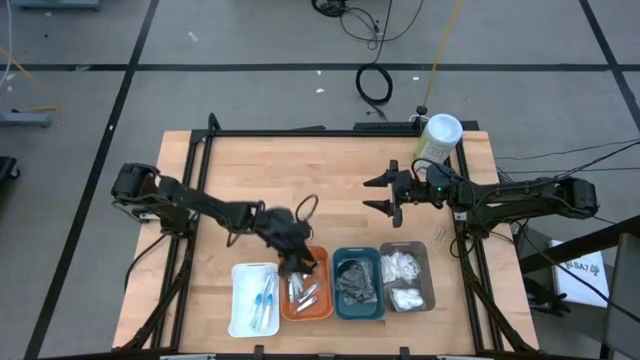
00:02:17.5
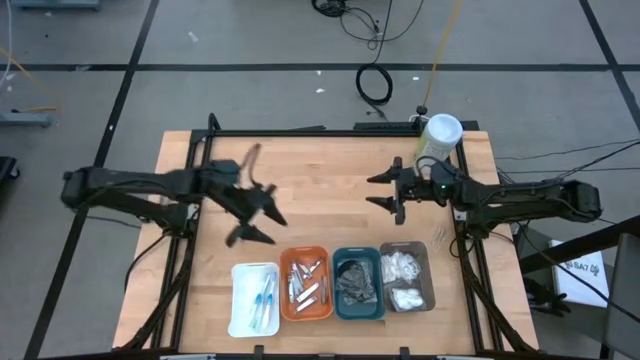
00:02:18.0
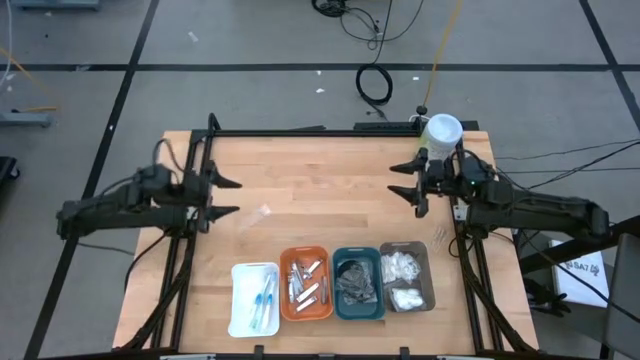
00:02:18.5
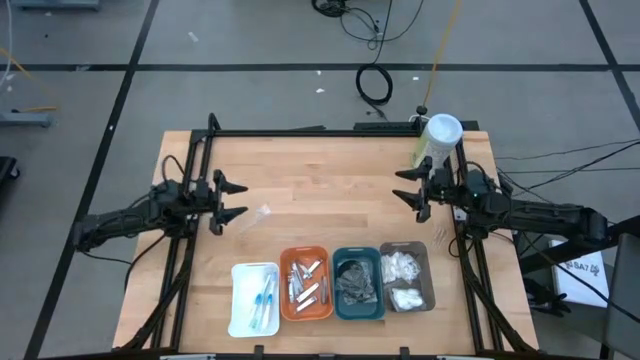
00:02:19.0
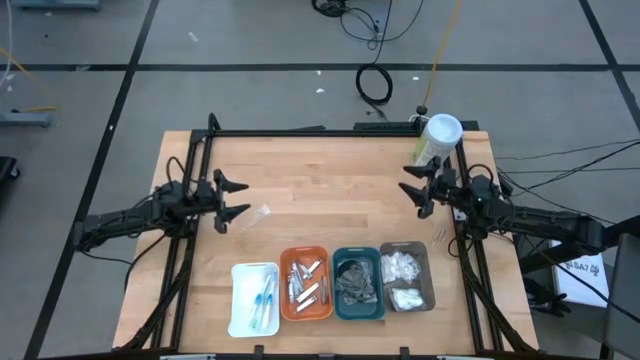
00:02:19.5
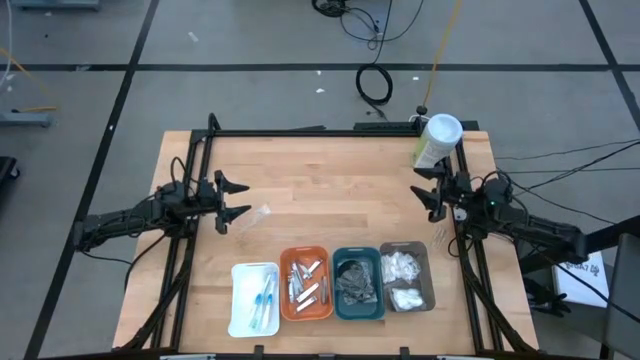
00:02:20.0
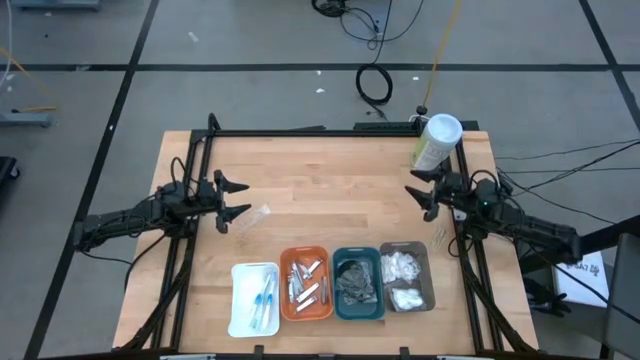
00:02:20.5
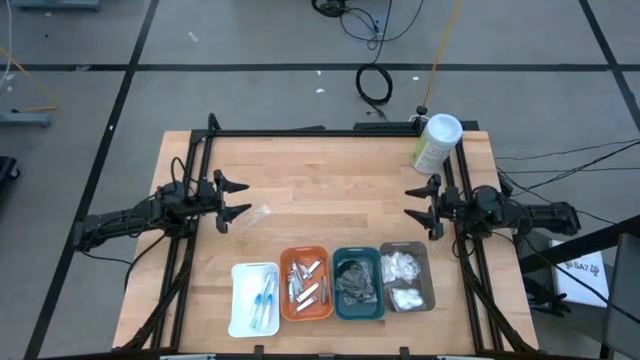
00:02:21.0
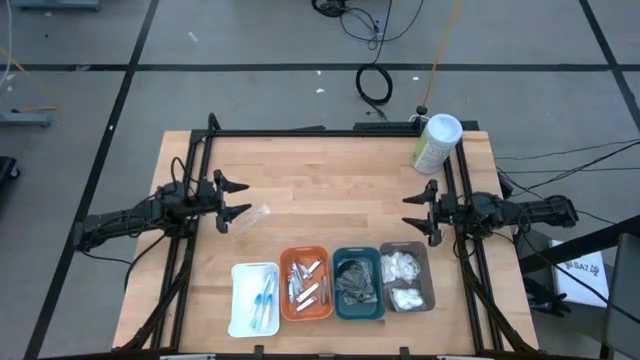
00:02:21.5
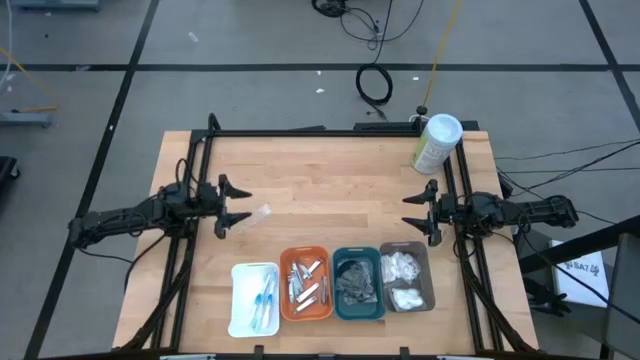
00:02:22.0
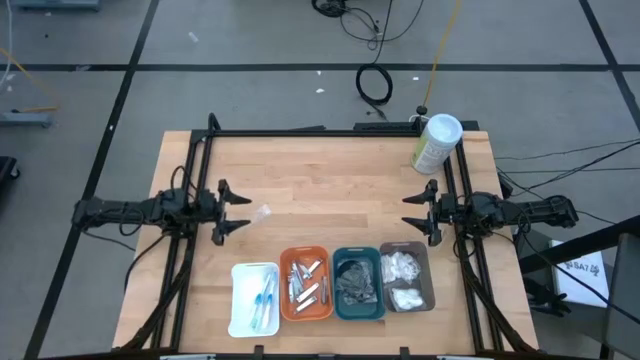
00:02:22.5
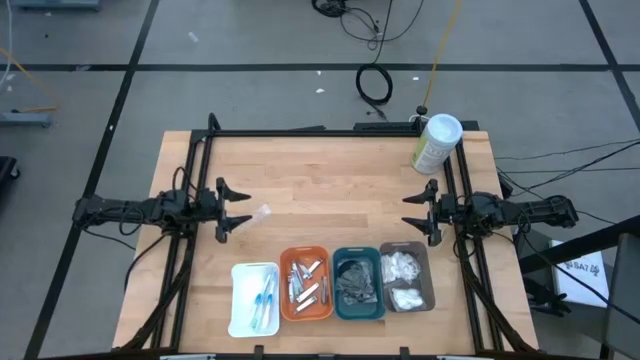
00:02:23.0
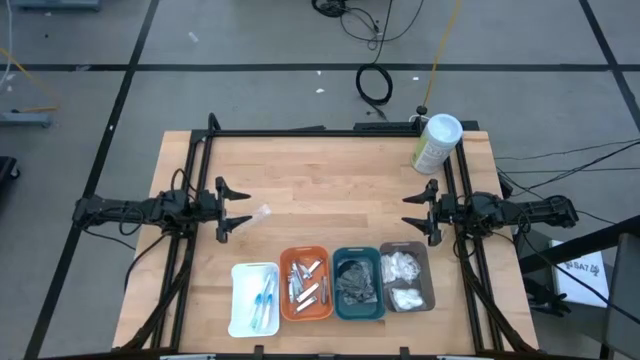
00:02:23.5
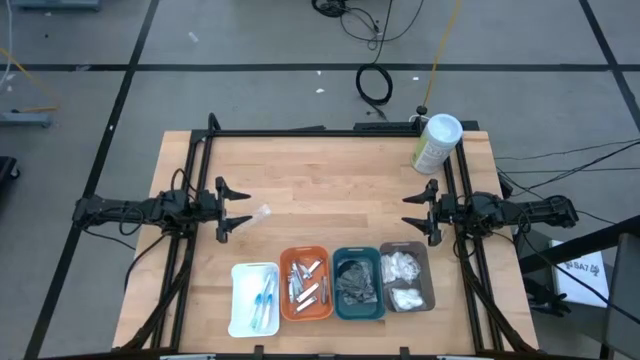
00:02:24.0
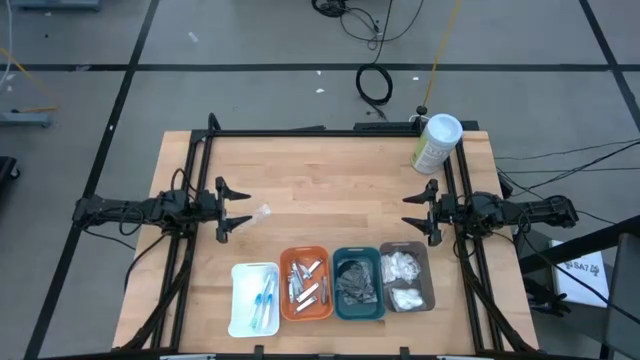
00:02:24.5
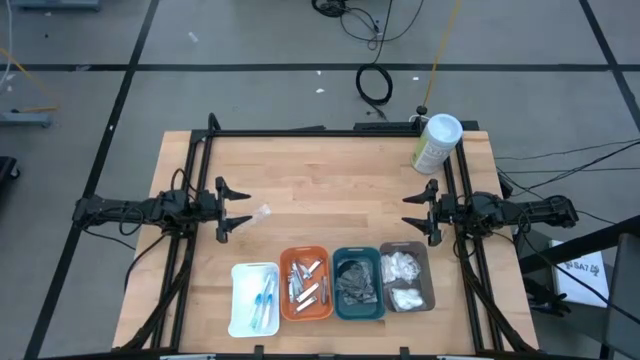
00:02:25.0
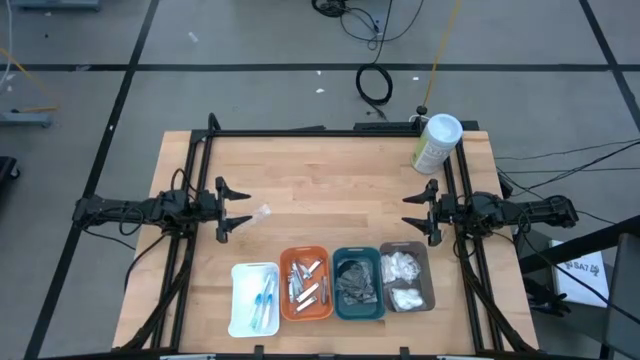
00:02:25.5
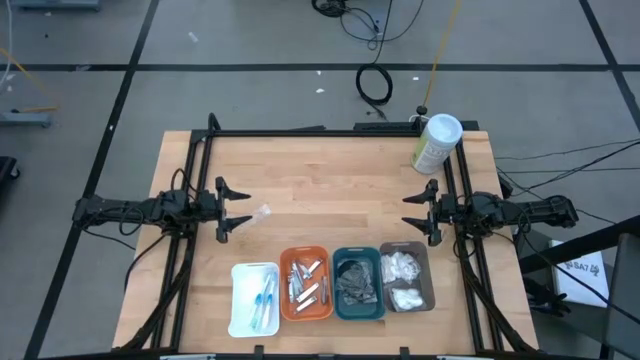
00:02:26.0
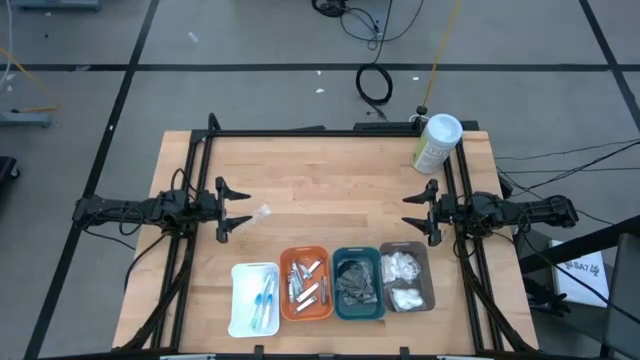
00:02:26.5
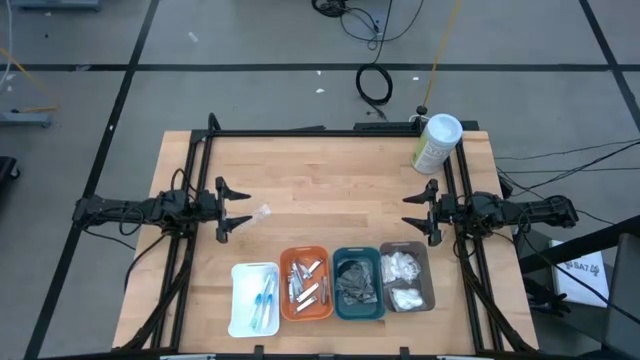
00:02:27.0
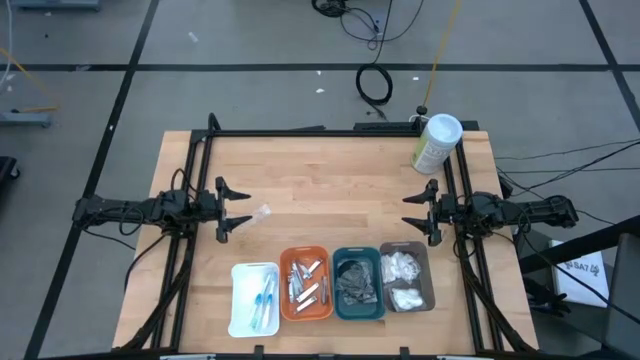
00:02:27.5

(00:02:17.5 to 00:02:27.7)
Task: Pick & Place Travel size toiletries
Return to Home Position

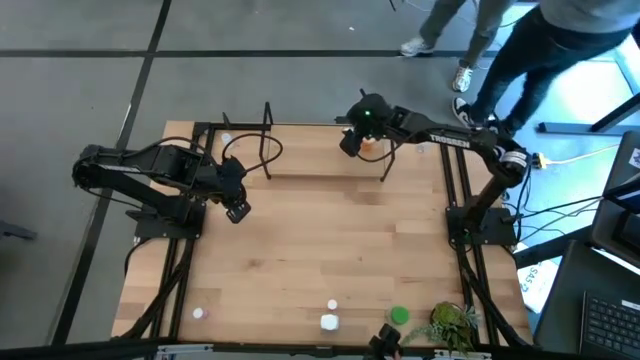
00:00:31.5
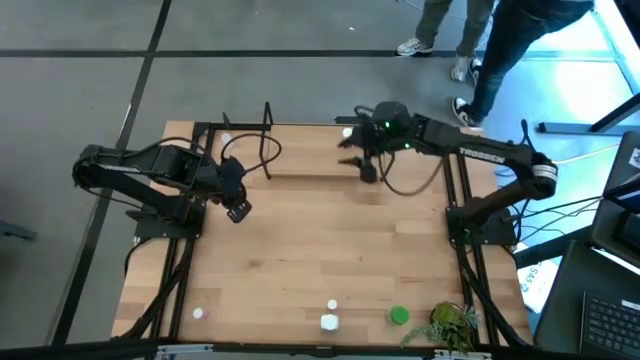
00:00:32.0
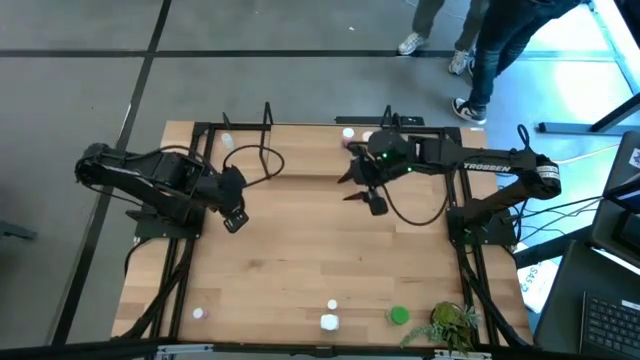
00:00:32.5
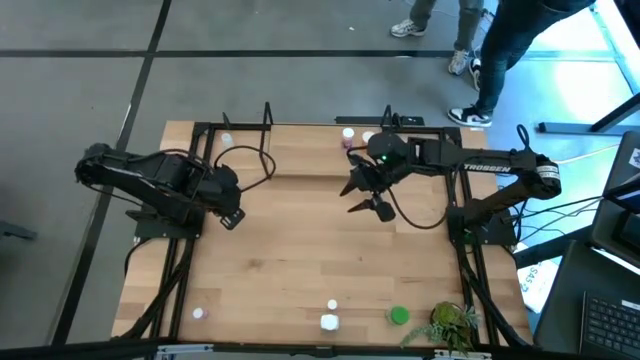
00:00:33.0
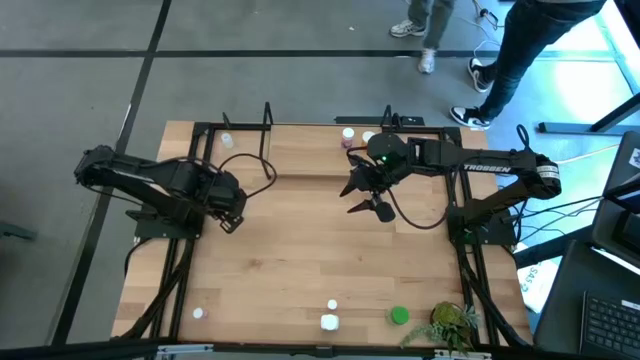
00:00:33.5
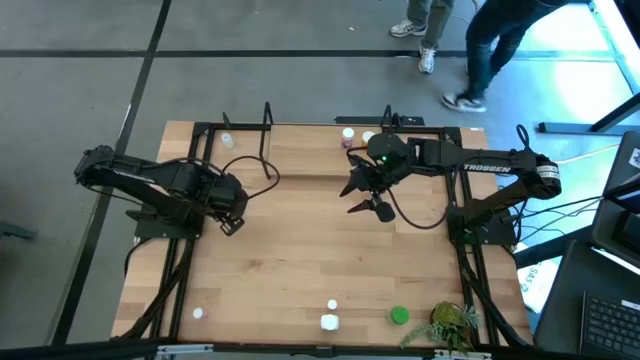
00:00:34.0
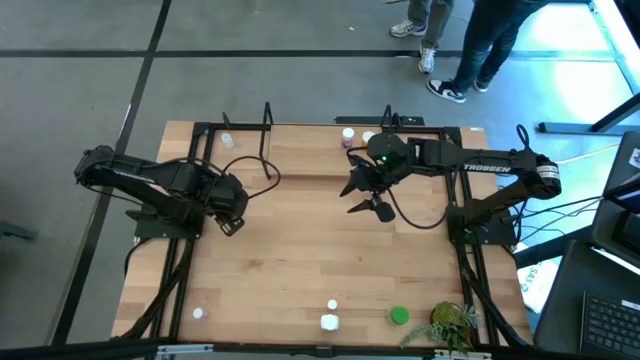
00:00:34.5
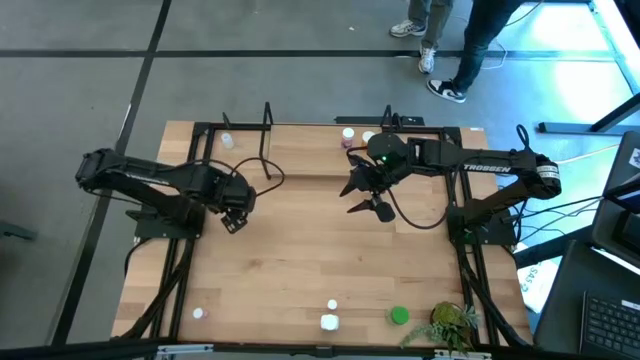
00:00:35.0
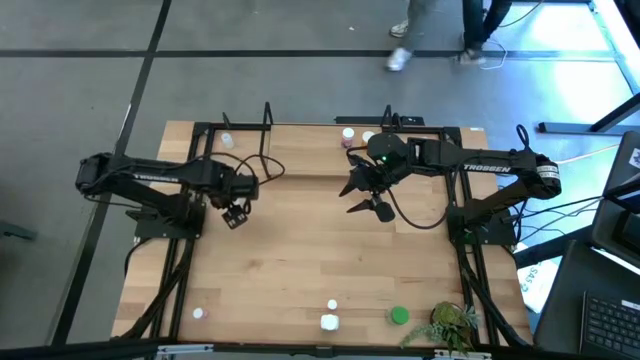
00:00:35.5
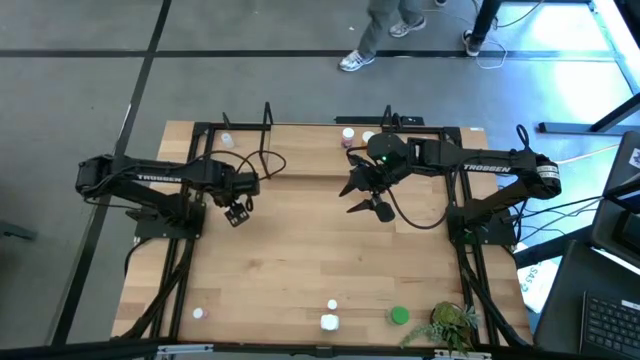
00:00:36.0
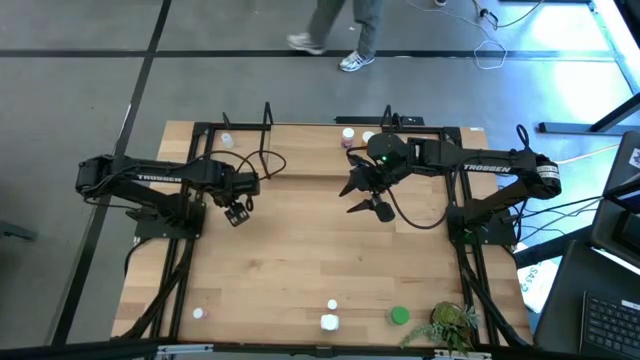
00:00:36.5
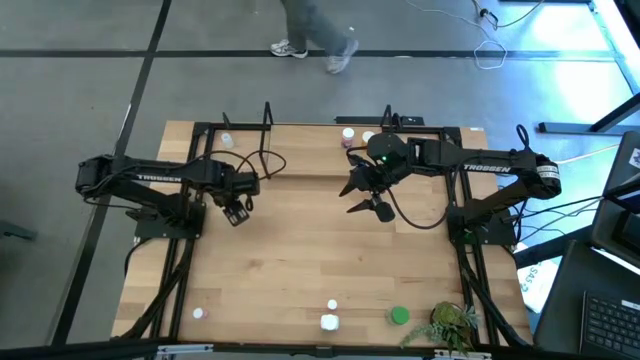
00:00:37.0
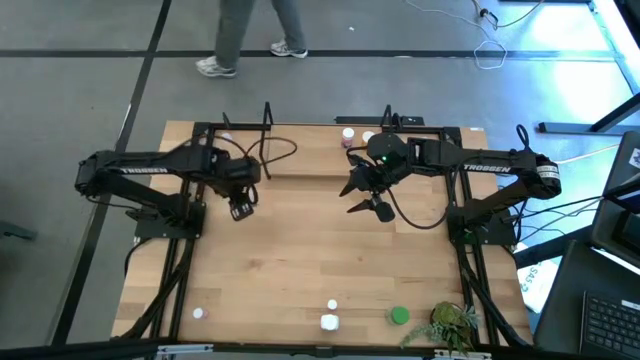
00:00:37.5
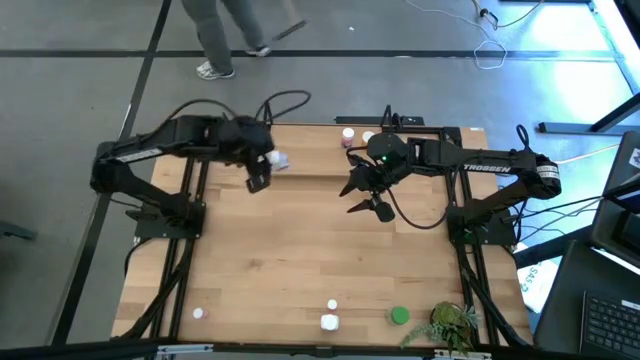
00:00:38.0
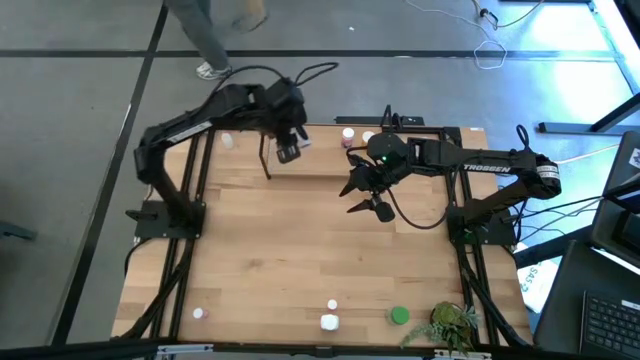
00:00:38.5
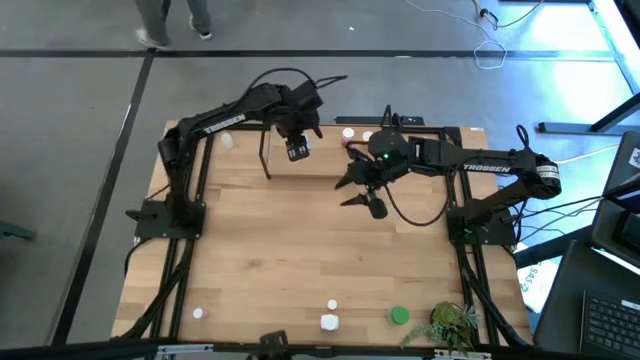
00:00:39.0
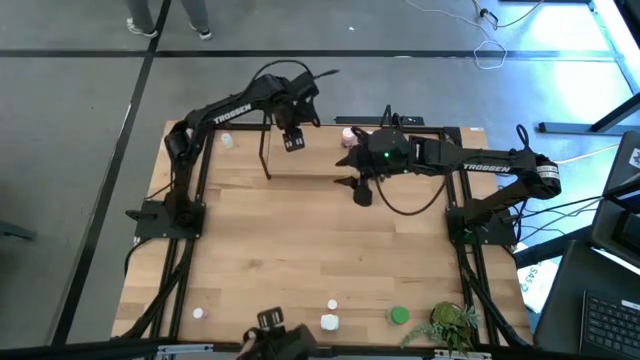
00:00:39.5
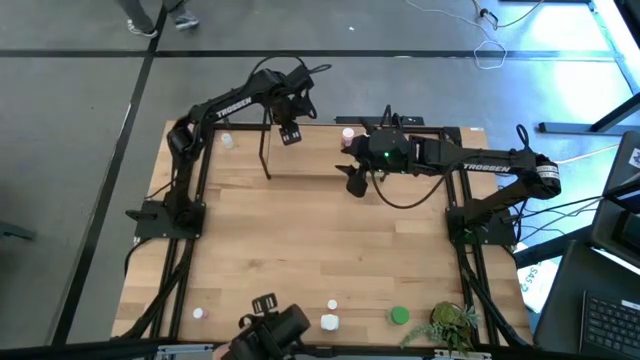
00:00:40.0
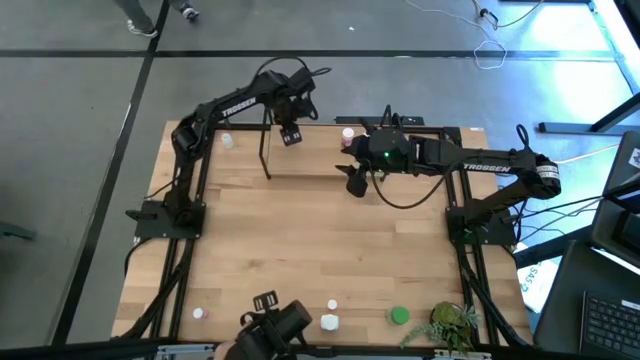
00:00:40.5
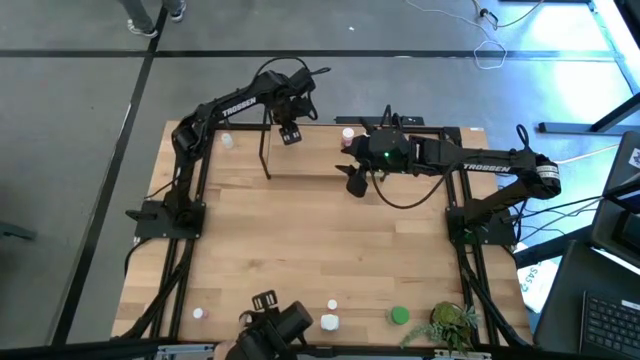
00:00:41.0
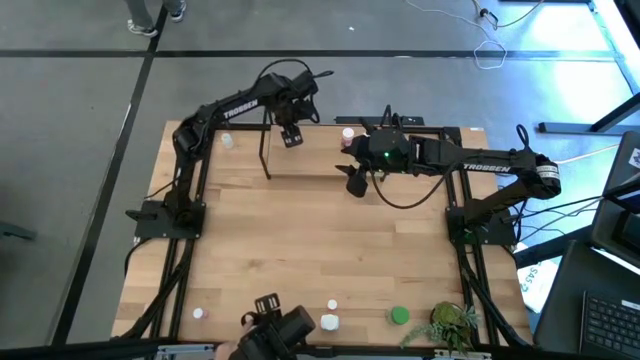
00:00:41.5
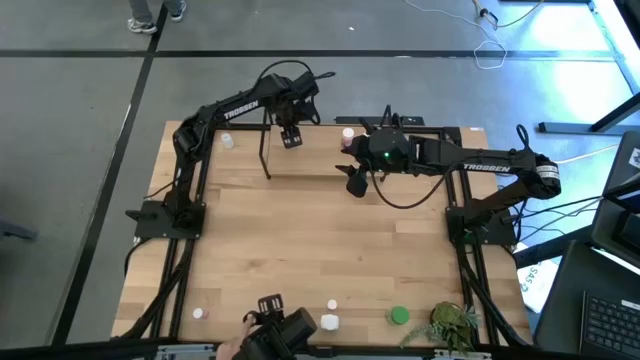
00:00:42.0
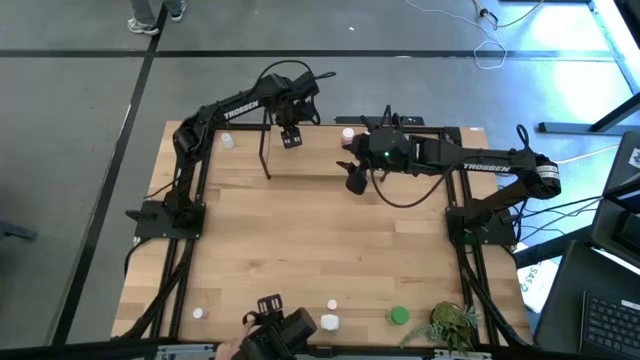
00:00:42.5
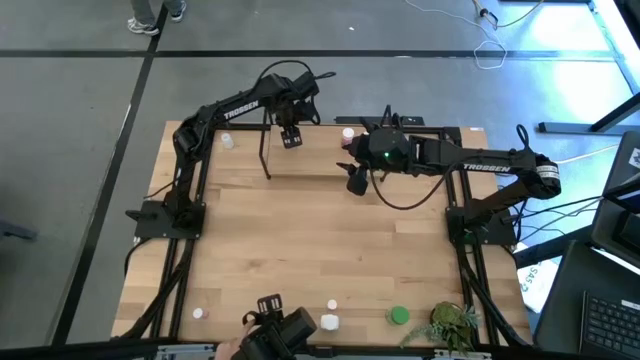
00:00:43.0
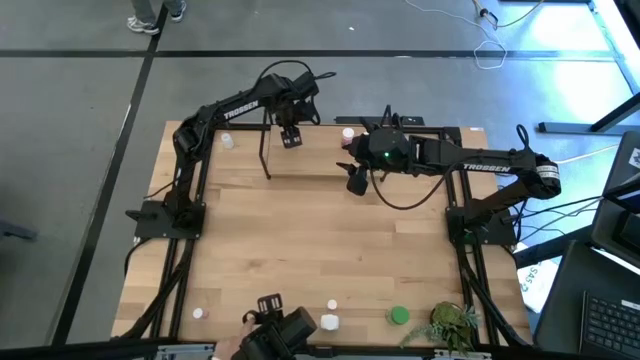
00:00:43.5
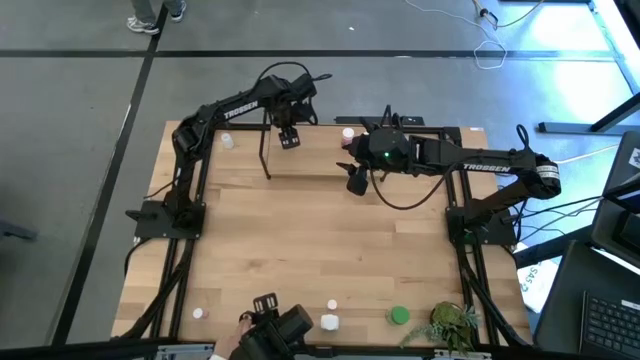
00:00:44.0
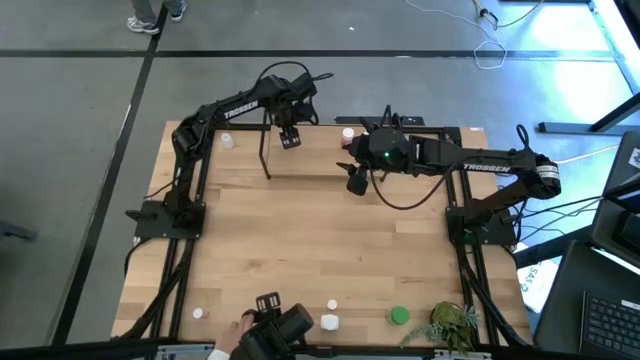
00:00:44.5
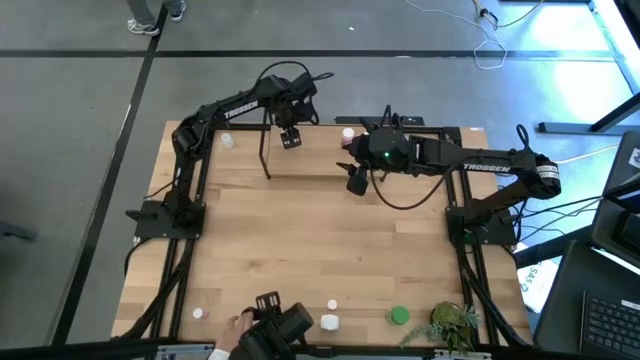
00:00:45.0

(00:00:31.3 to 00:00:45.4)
Task: Pick and place medicine bottles onto shelf by color
Put the top white and blue pill bottle on the shelf
